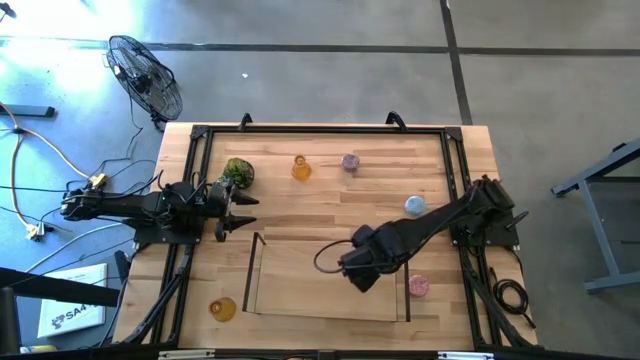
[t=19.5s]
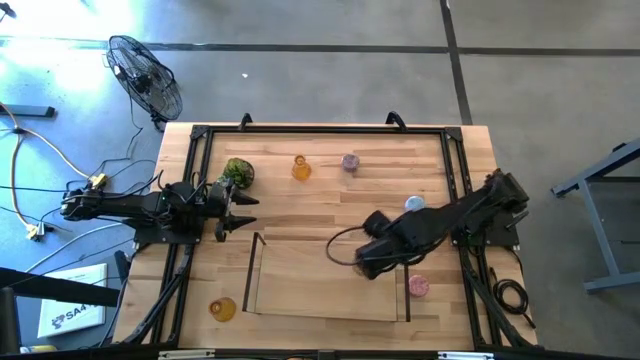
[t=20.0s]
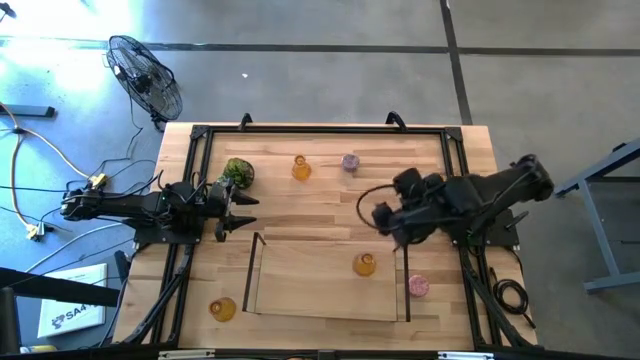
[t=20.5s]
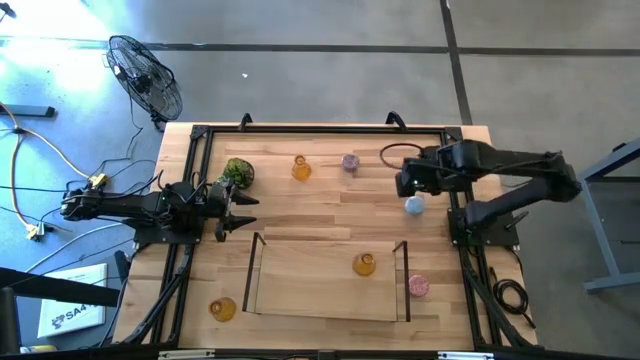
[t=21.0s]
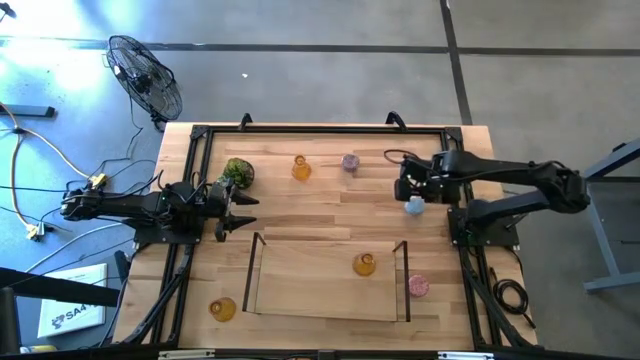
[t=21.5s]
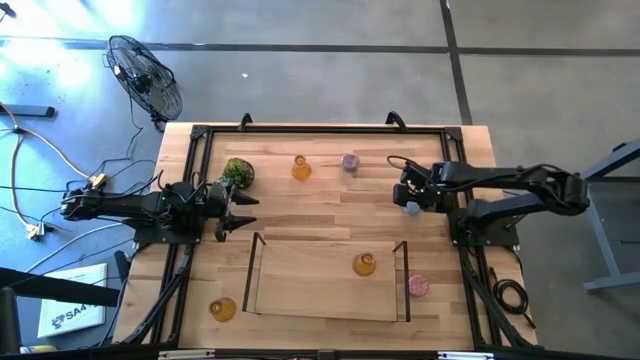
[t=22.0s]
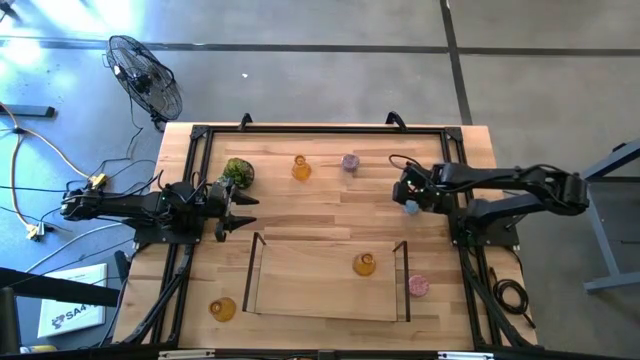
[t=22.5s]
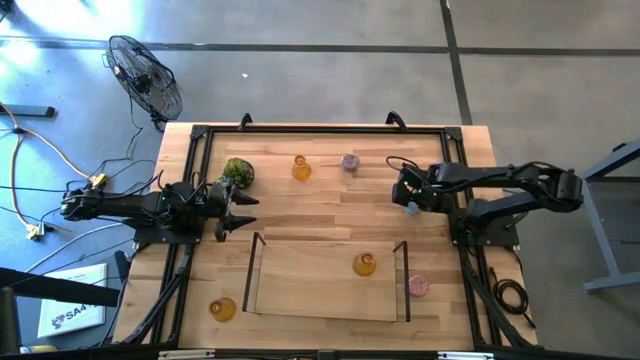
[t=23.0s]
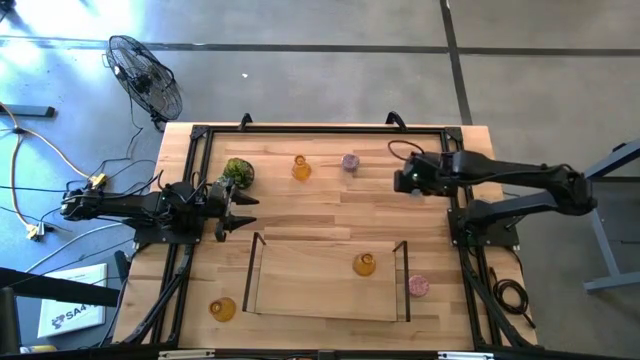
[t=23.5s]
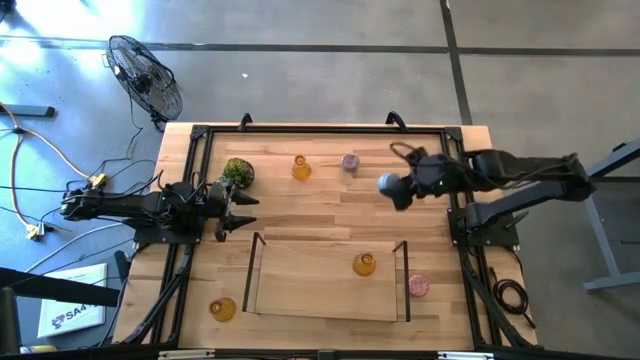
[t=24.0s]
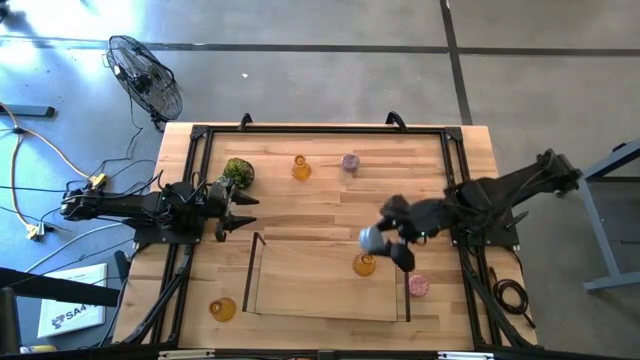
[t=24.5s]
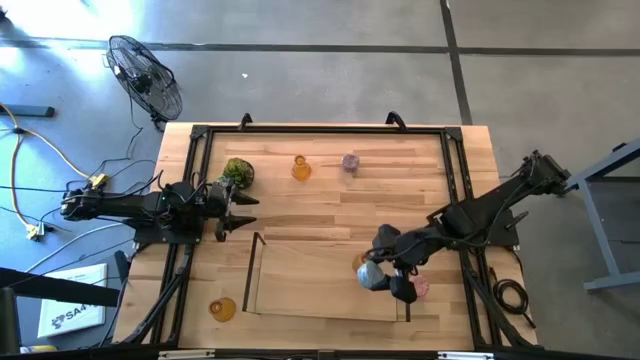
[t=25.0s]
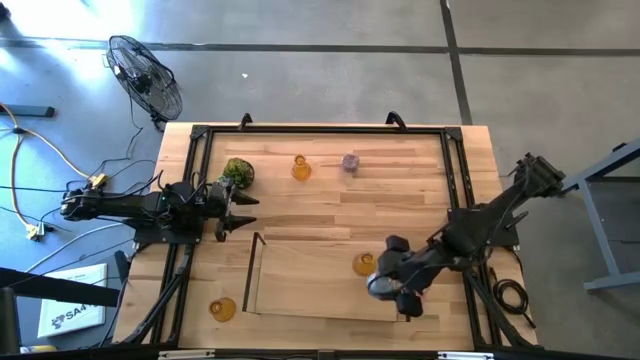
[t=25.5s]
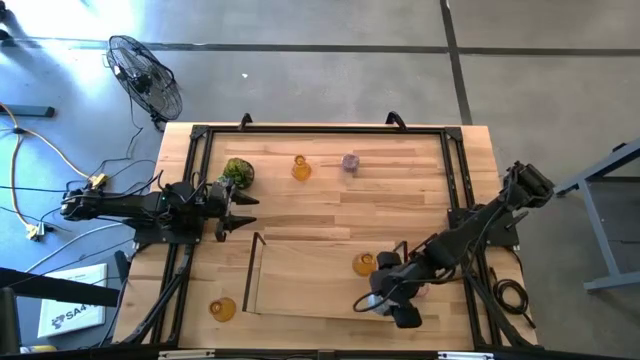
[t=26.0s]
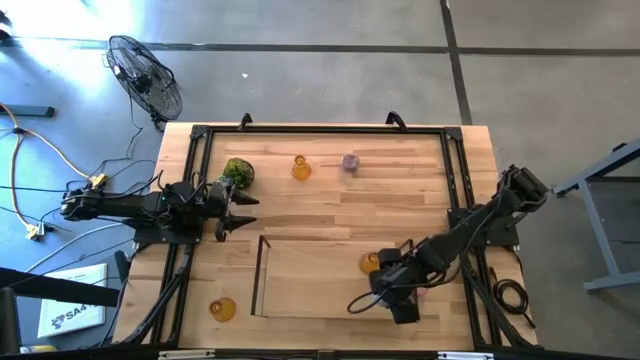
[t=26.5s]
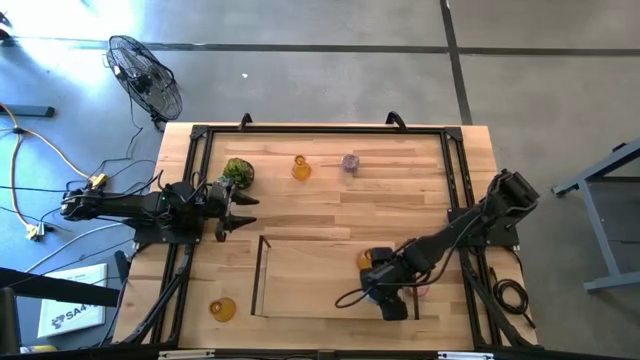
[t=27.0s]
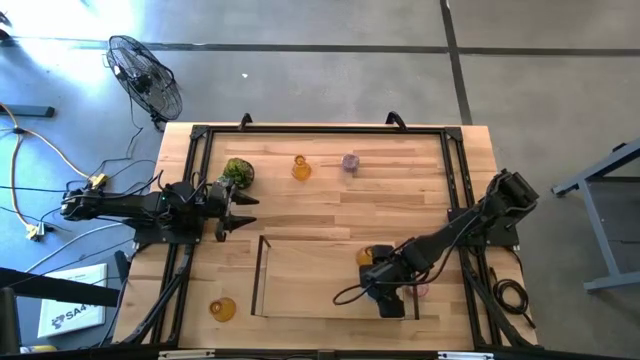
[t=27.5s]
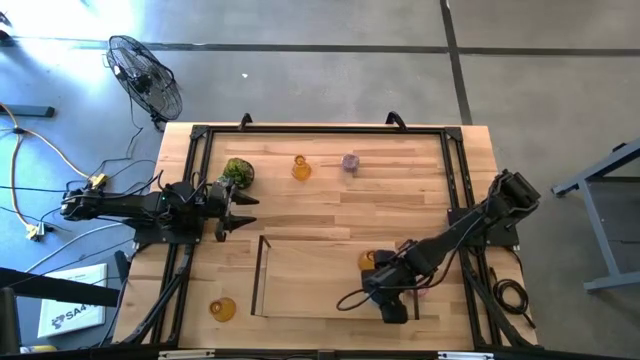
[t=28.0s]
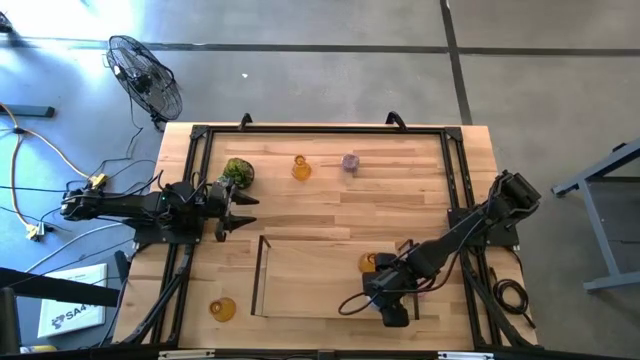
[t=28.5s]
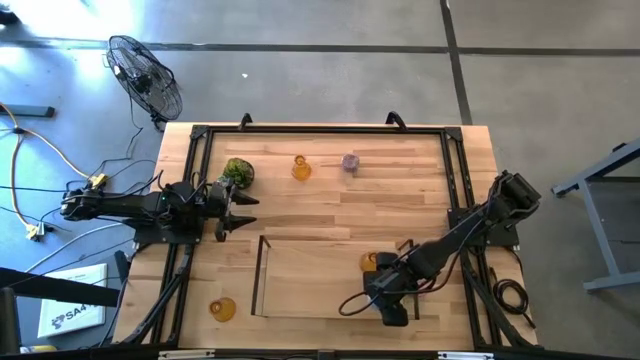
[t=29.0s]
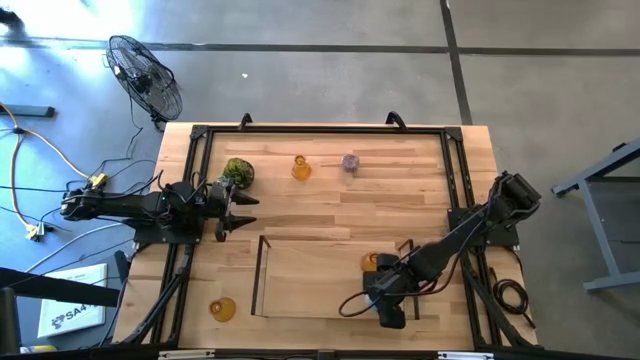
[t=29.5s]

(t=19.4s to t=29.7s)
Task: Pick & Place candle stick holders
Put the blue patterned scented candle on the shelf

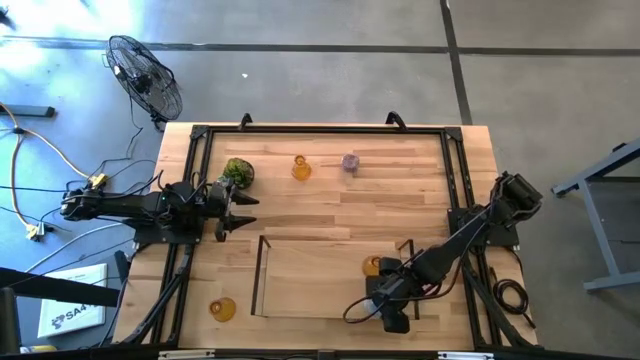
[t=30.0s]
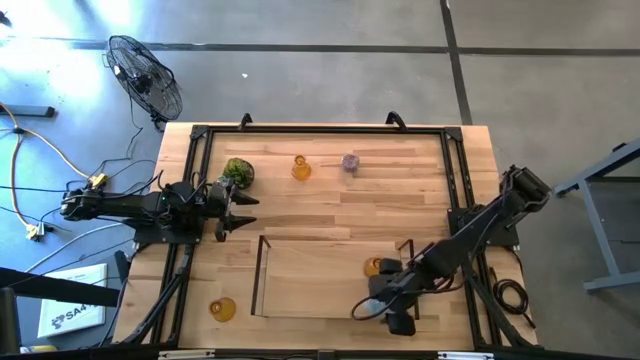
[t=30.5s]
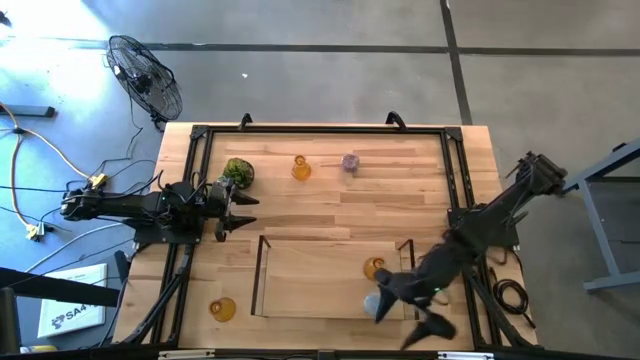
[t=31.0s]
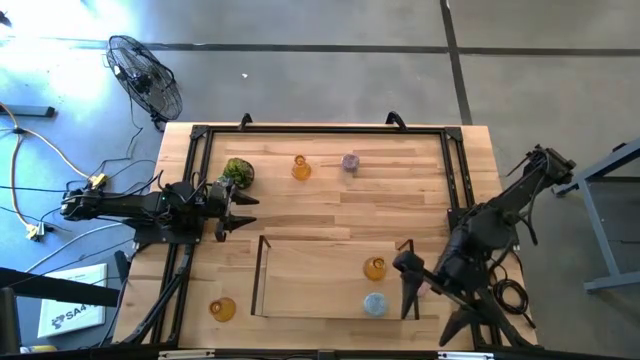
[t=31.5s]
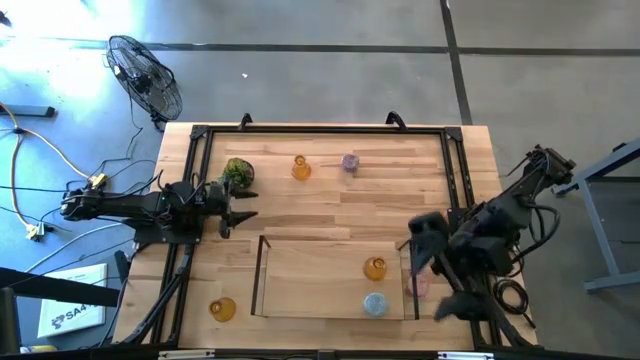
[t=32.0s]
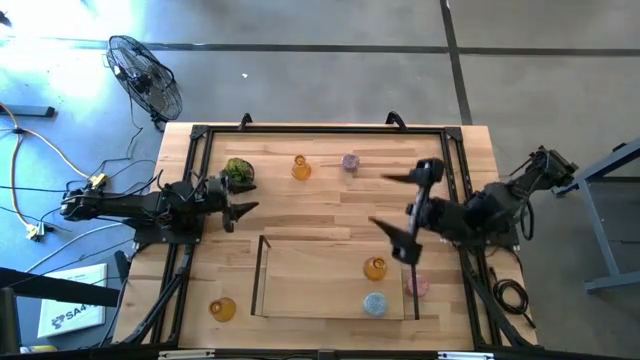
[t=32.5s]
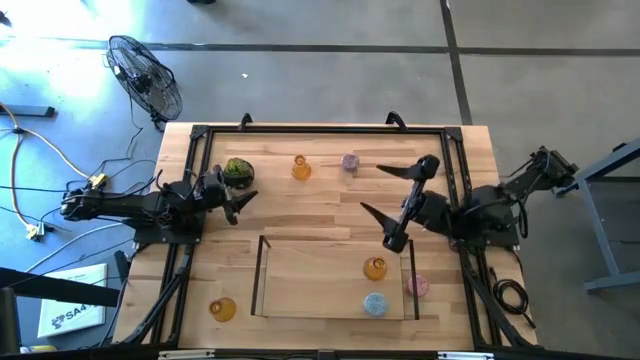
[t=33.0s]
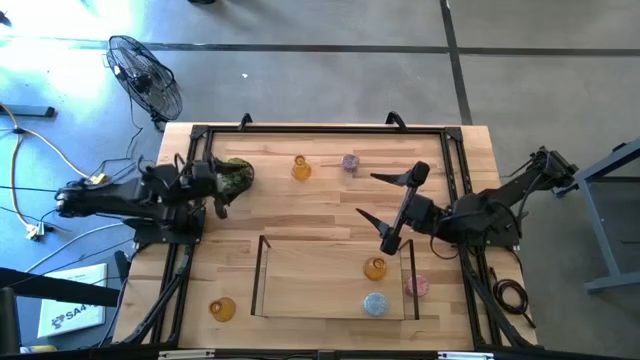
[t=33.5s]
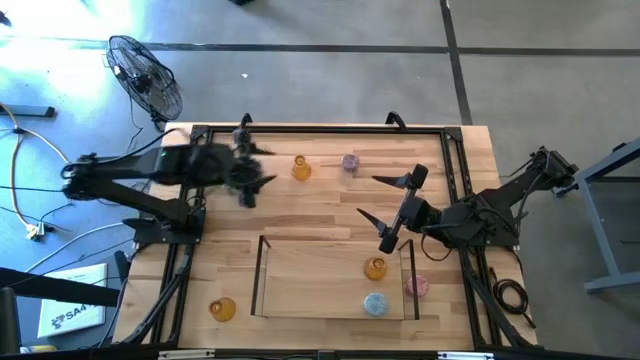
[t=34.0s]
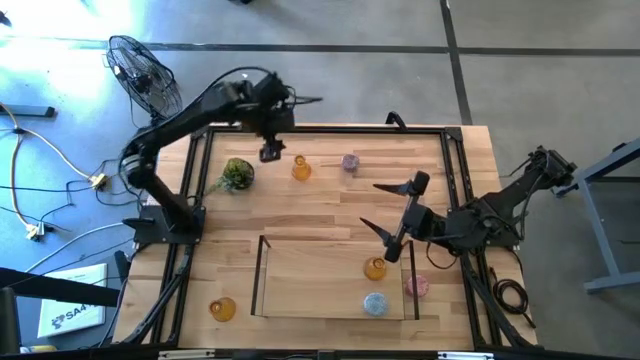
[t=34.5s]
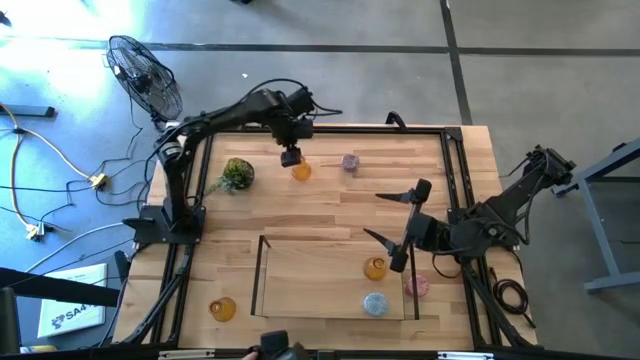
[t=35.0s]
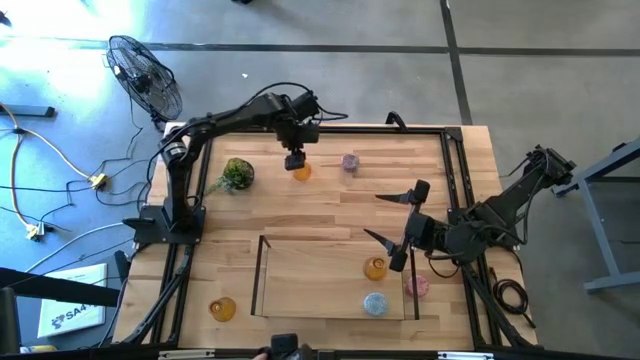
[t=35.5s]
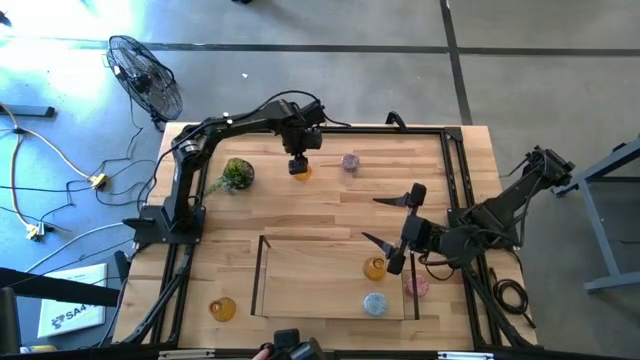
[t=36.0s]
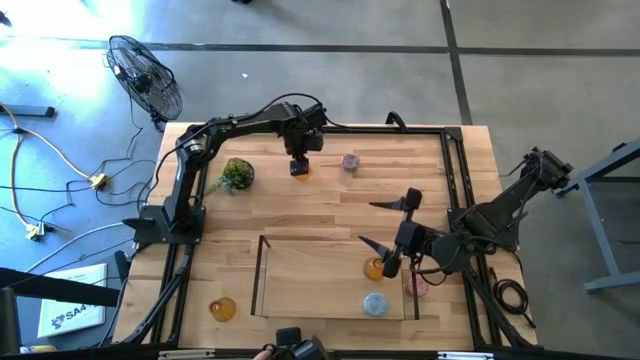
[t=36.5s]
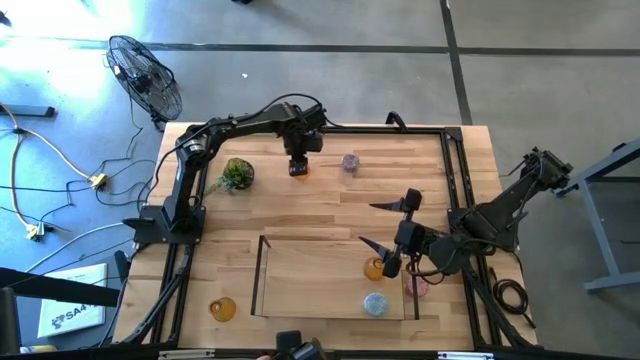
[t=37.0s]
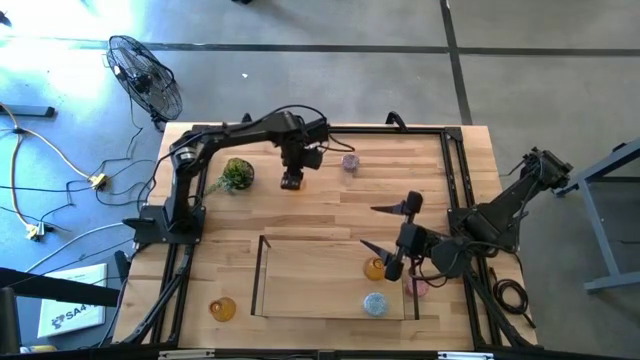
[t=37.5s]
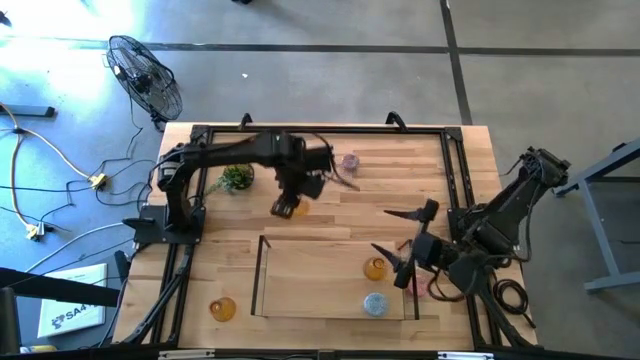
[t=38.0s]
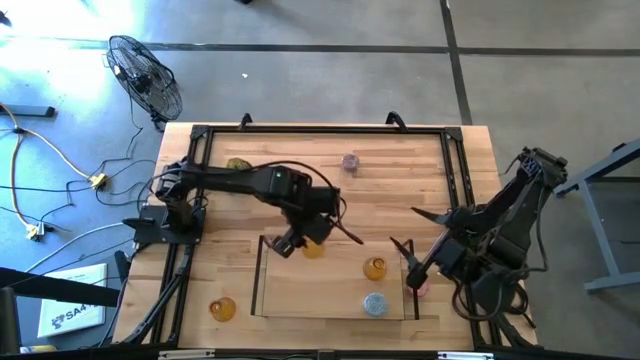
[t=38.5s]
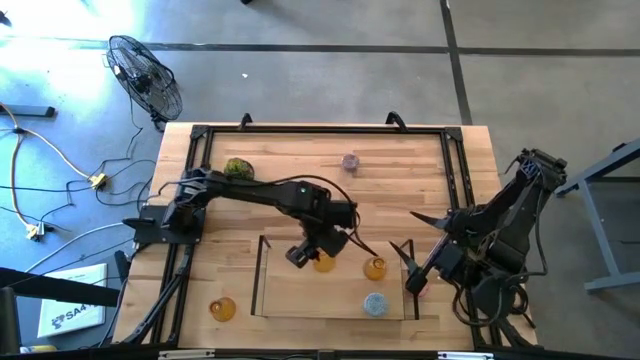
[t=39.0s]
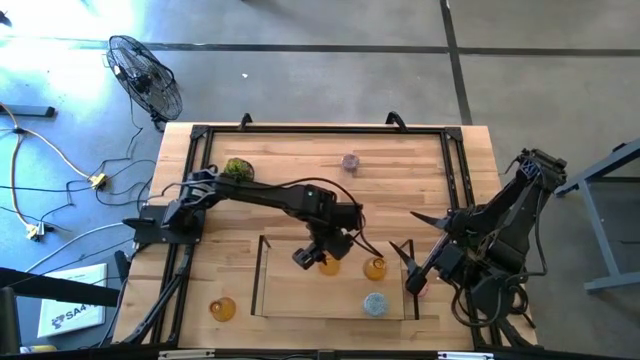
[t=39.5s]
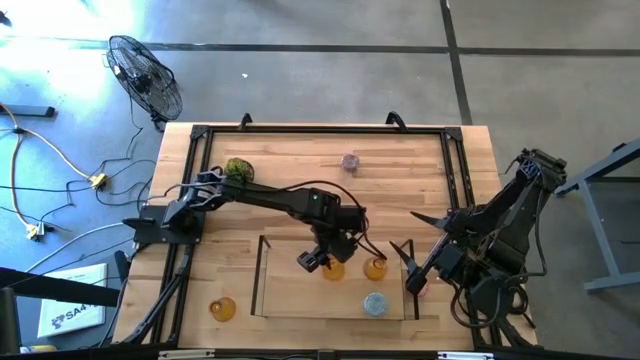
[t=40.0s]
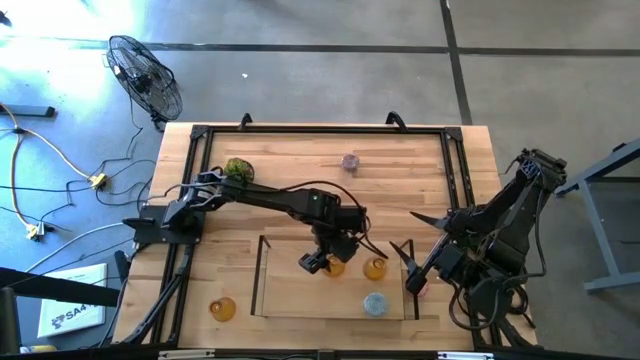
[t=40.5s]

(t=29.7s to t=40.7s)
Put the top brown vase candle holder on the shelf
